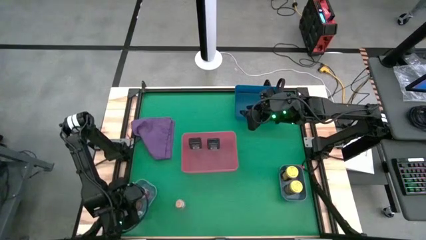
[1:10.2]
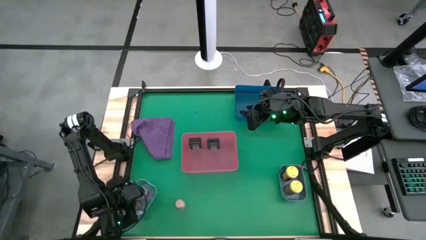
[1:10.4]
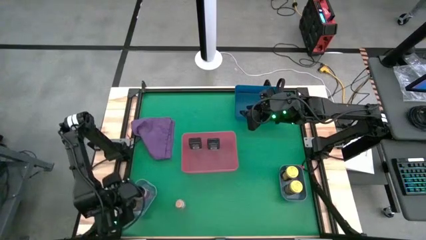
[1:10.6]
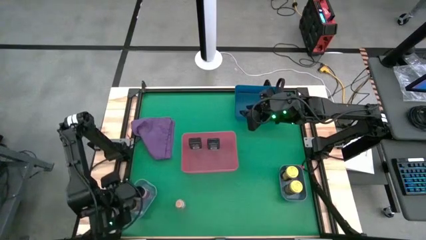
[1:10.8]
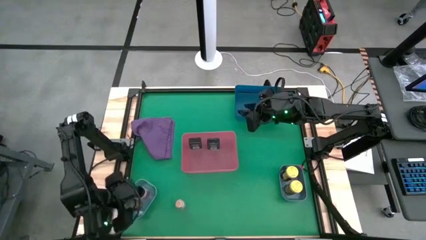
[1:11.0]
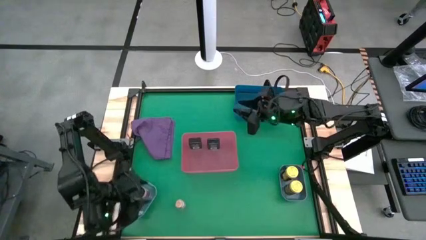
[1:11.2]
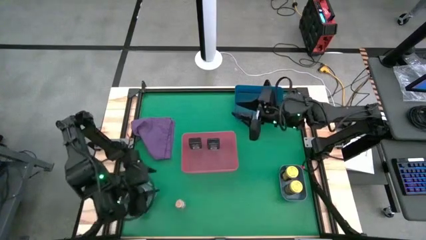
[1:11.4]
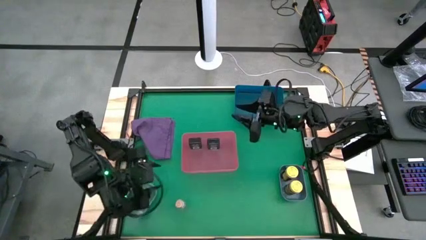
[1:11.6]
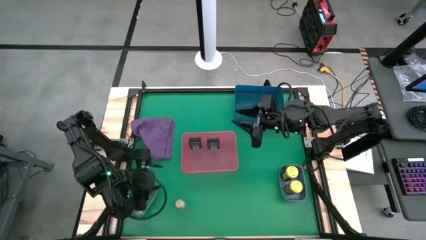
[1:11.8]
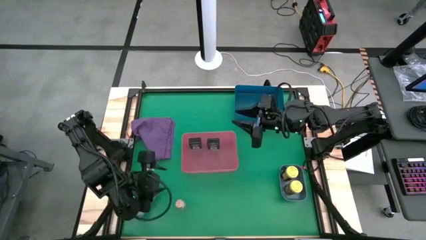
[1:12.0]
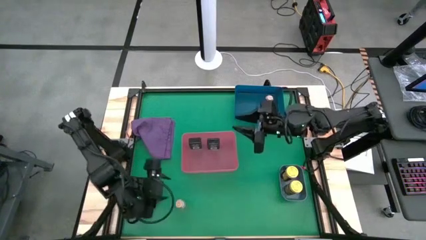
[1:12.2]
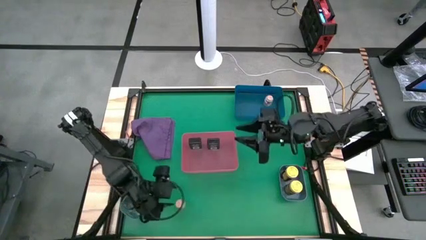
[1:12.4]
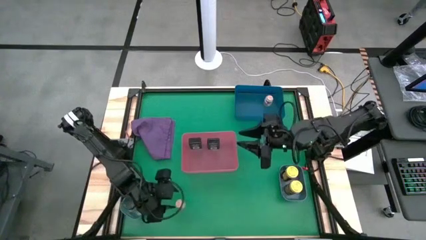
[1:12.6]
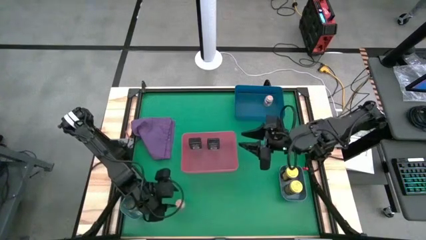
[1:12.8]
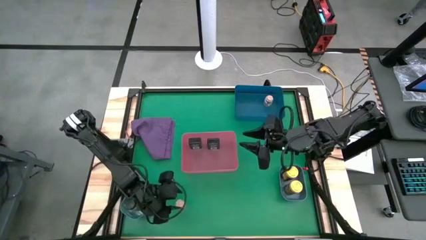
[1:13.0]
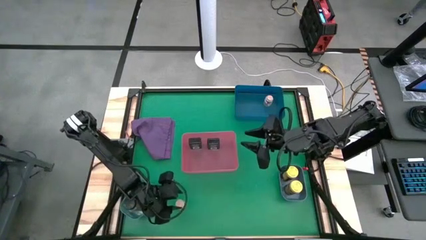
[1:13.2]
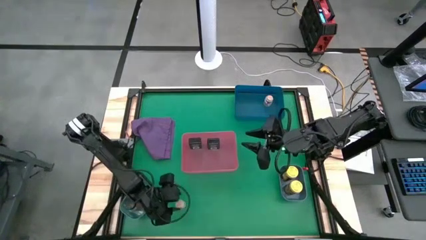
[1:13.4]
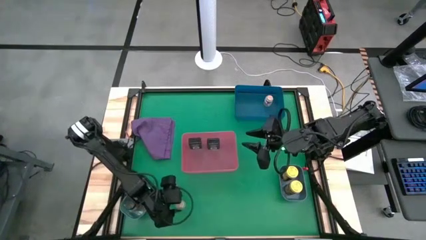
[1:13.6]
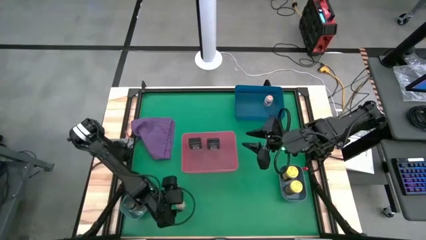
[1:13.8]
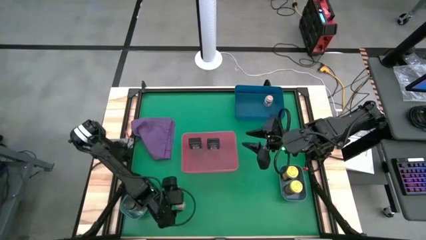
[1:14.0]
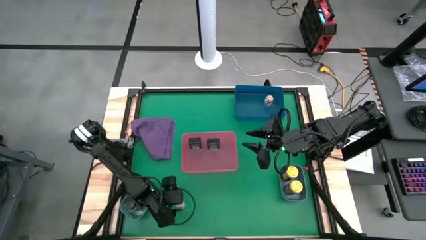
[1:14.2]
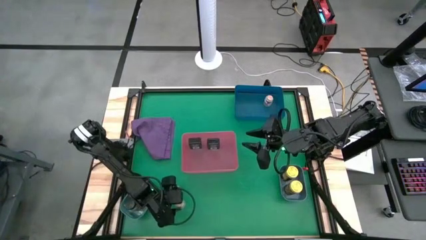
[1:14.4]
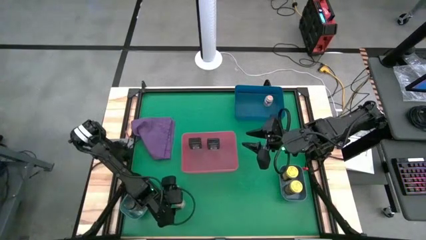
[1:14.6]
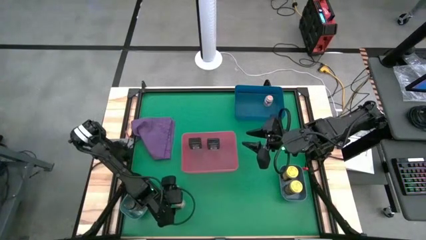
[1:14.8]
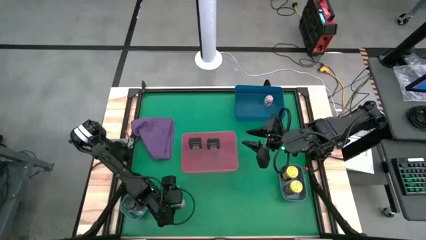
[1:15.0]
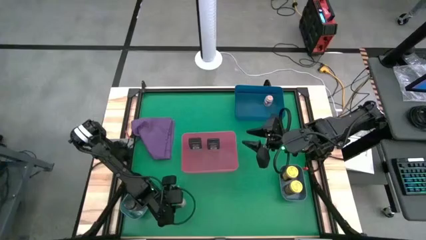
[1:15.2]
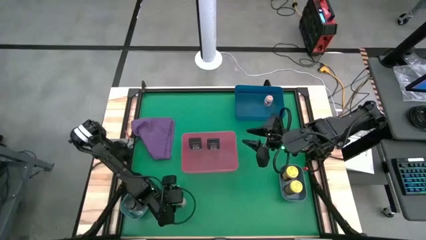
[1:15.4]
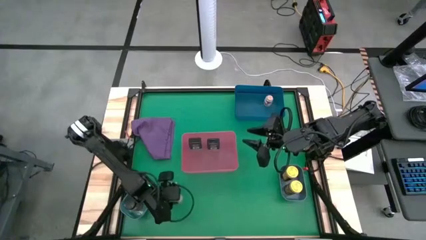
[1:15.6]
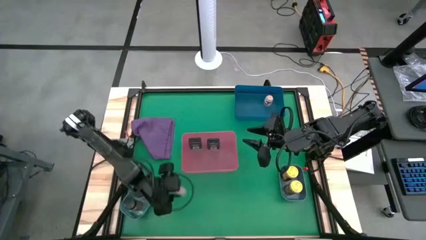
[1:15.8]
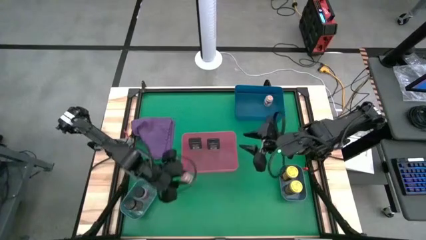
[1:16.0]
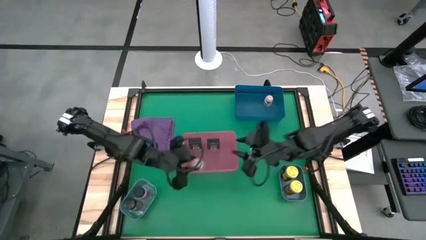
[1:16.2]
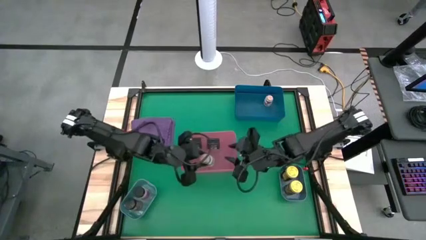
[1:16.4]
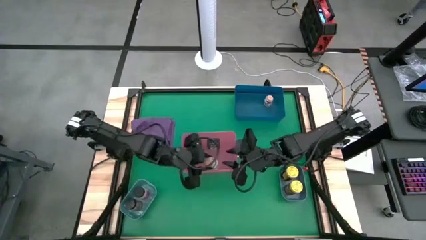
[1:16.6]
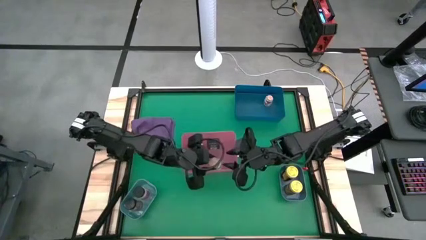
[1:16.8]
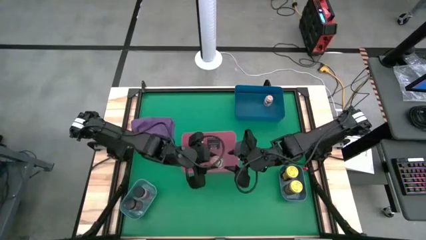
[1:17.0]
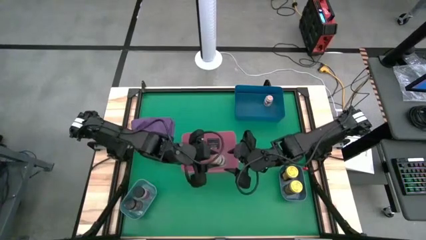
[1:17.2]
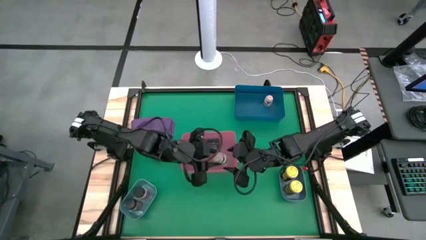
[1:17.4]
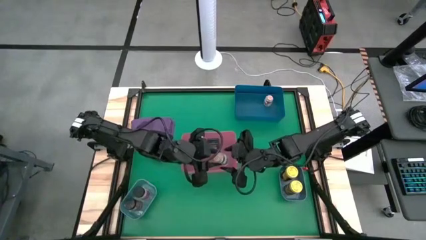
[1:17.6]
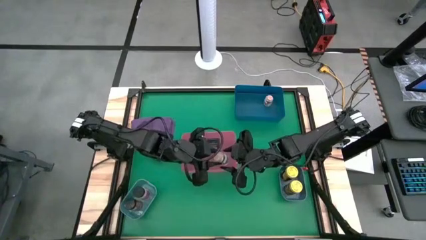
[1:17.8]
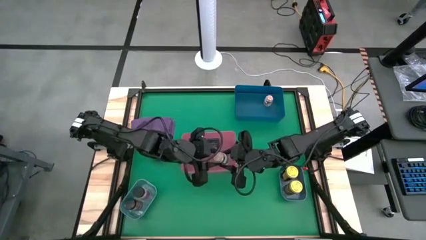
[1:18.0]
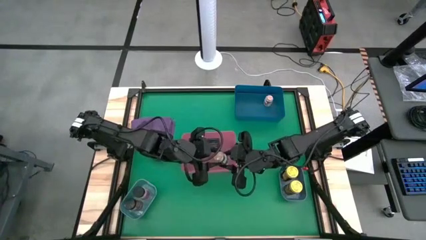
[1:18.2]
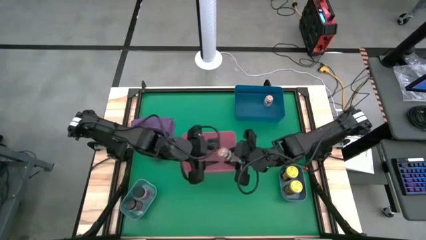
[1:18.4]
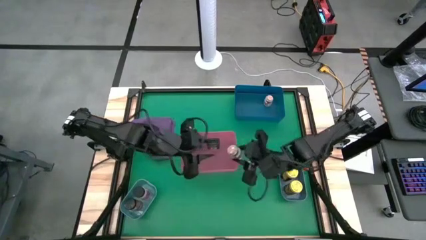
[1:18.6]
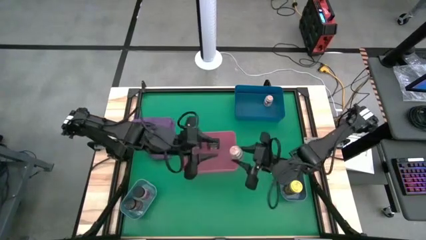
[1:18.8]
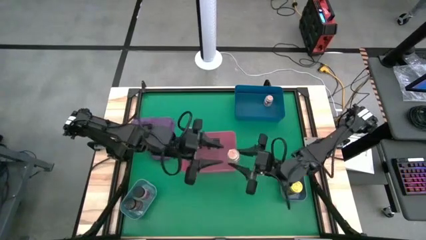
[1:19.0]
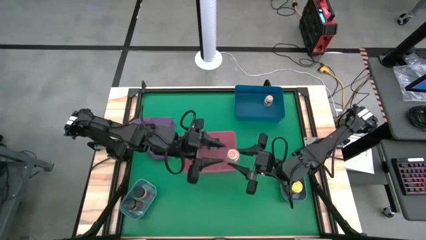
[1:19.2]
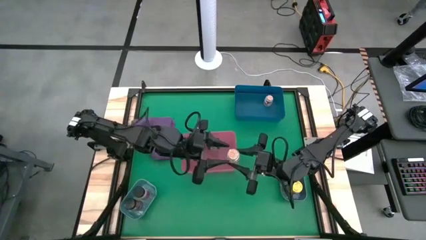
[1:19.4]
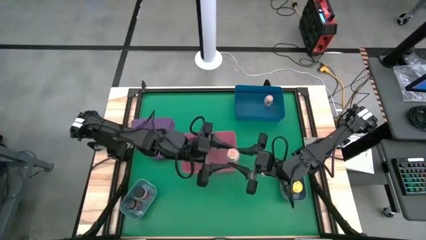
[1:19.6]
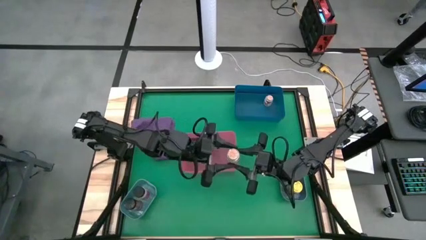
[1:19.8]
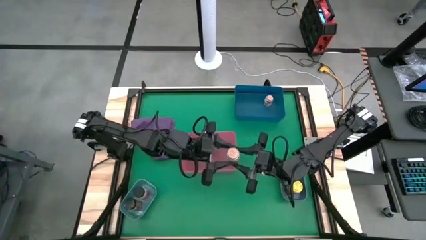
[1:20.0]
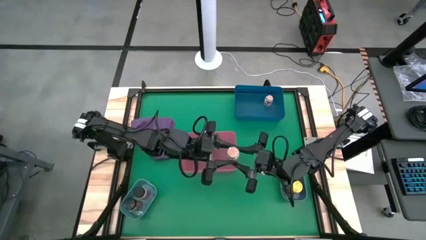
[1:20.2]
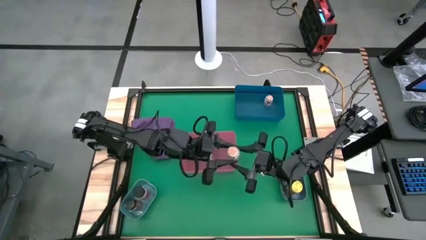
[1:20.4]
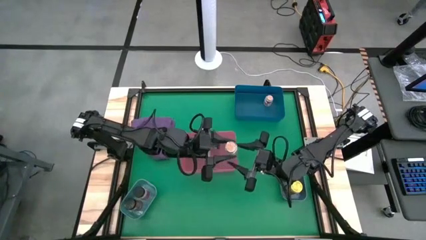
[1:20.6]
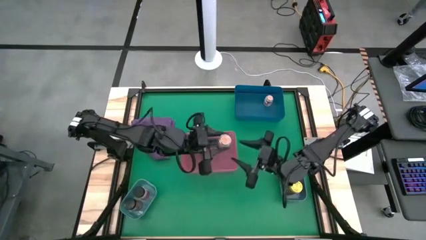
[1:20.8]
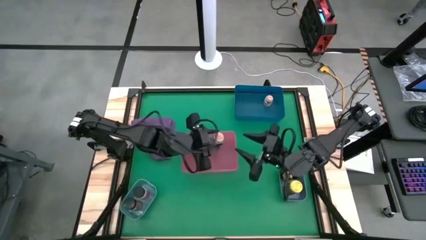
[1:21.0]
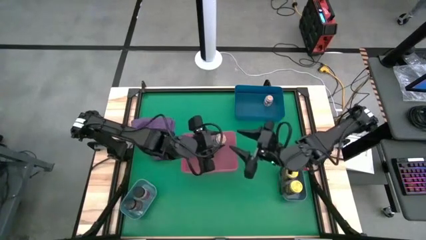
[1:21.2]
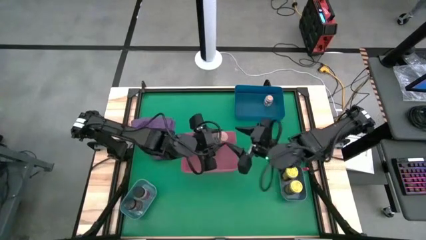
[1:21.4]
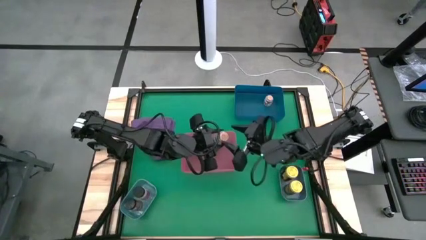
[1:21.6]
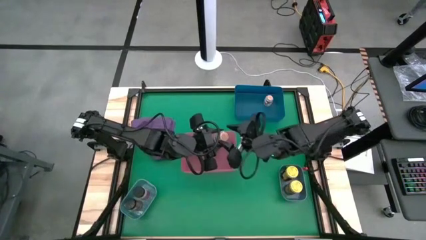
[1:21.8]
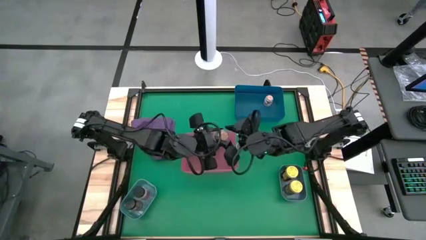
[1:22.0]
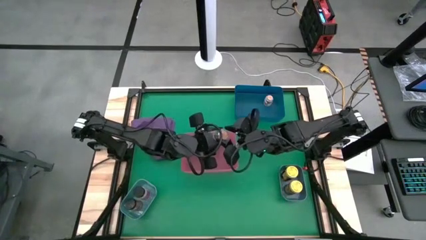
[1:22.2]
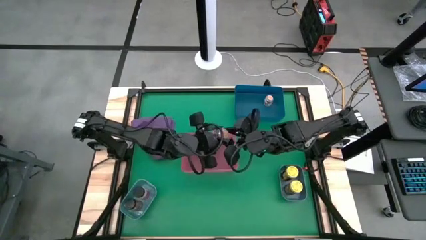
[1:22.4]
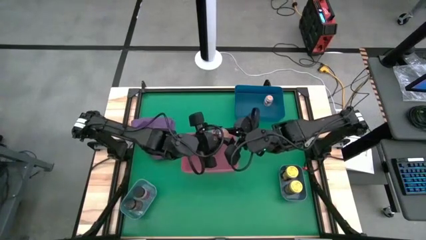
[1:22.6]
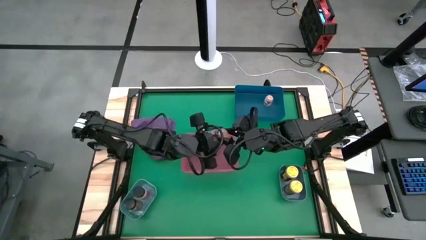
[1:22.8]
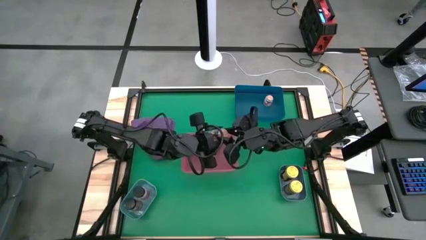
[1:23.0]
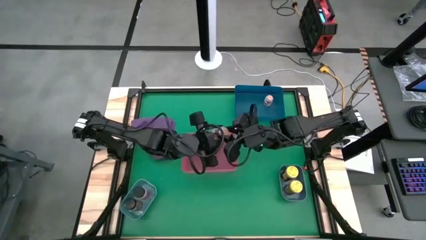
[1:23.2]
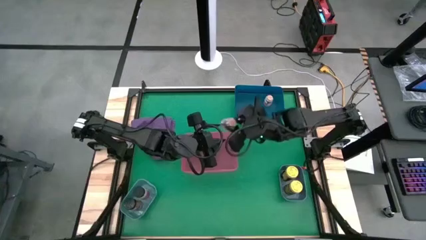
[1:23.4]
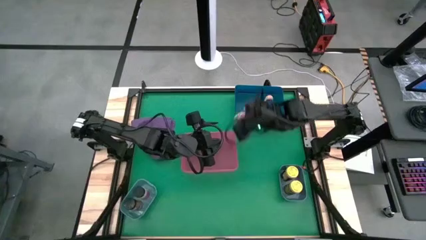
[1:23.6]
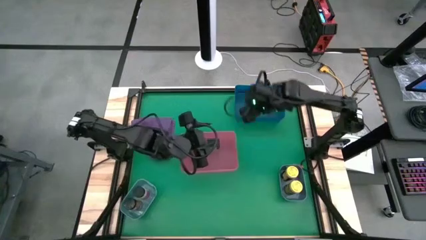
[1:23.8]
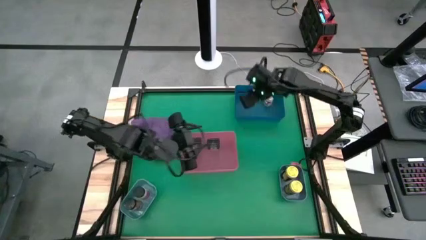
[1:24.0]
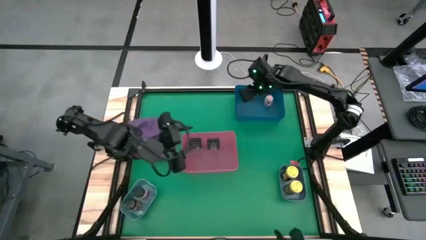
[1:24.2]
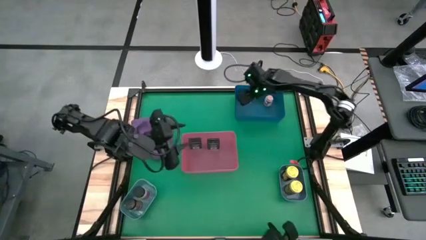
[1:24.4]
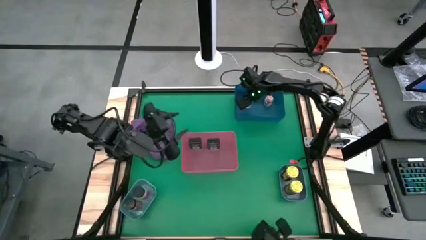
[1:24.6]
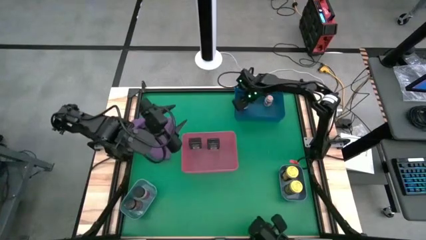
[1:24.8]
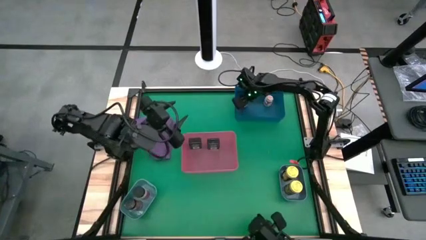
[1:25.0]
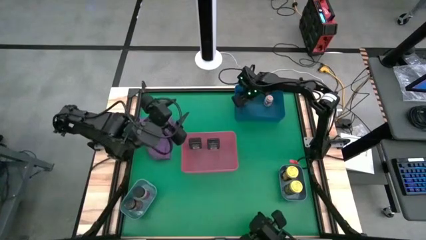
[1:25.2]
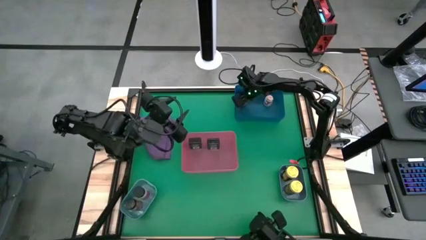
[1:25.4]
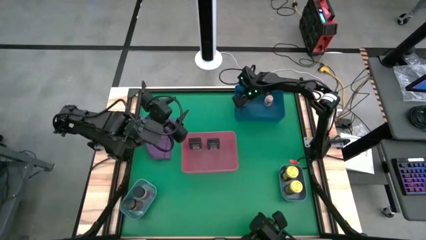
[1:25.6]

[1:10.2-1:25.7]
Task: Sort spices by type
Put the brown seasoning bottle into the blue bin
